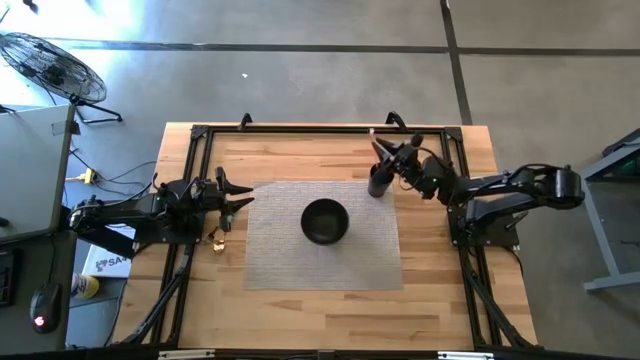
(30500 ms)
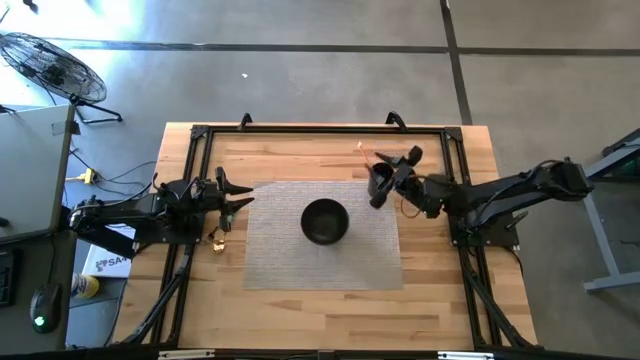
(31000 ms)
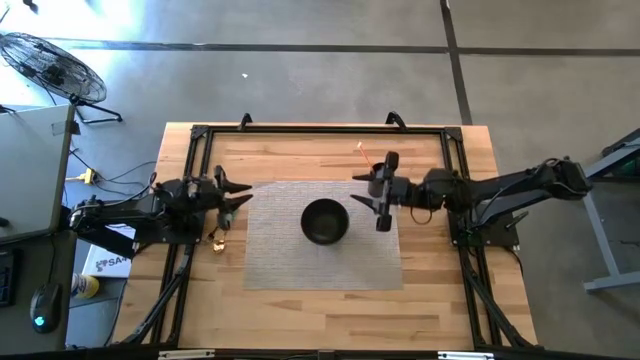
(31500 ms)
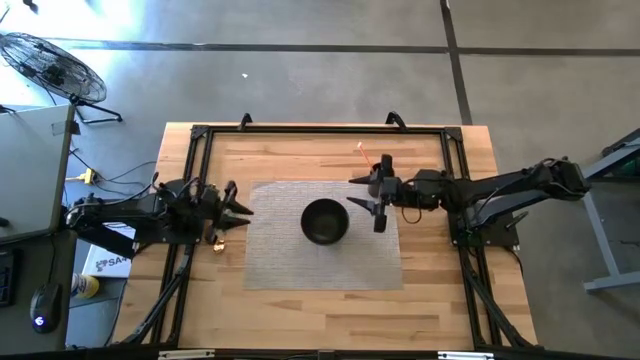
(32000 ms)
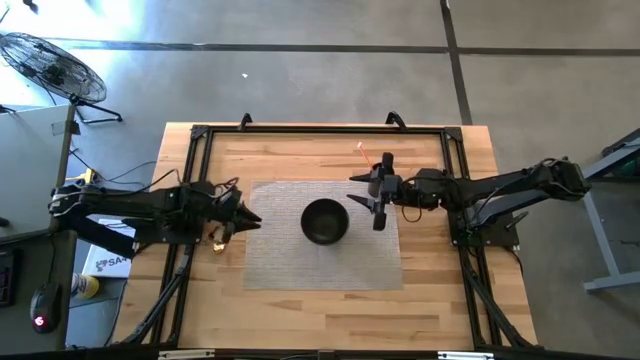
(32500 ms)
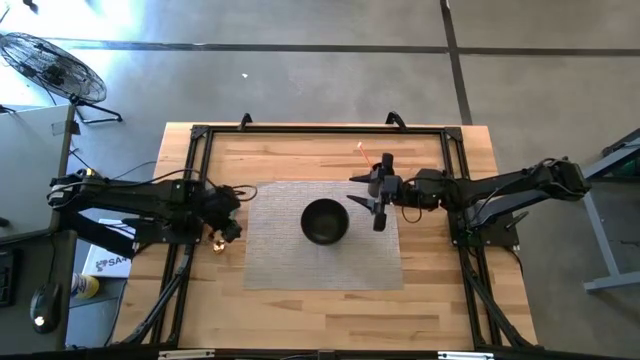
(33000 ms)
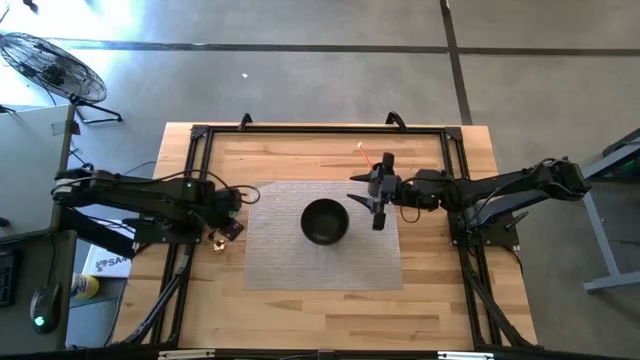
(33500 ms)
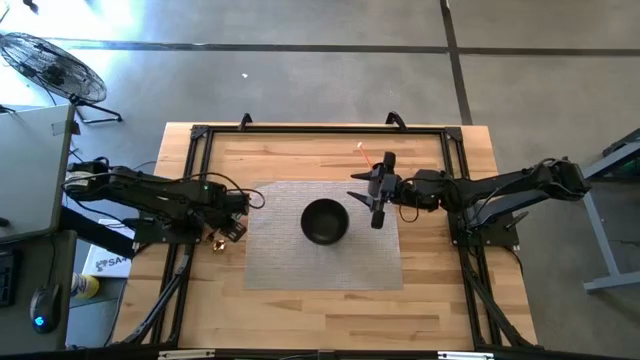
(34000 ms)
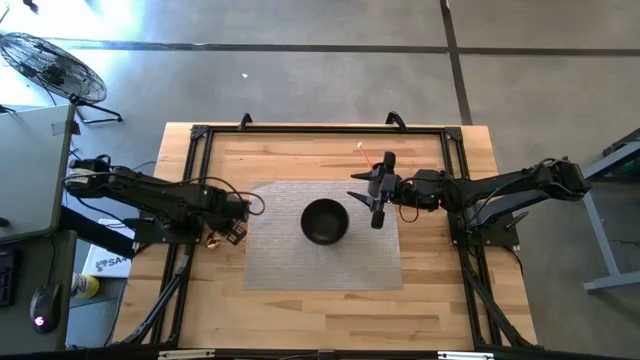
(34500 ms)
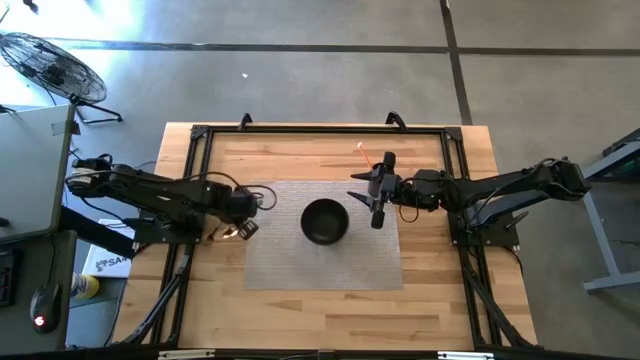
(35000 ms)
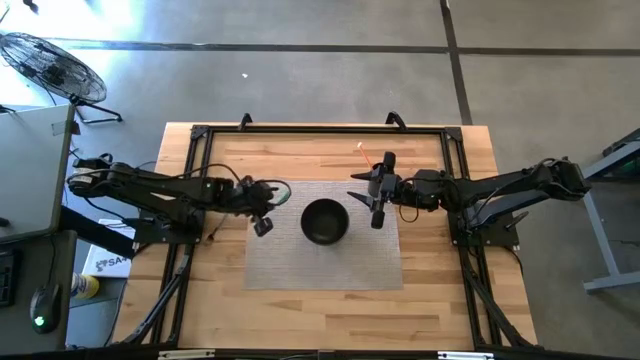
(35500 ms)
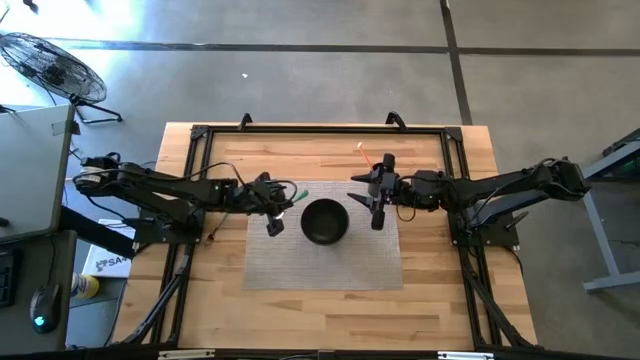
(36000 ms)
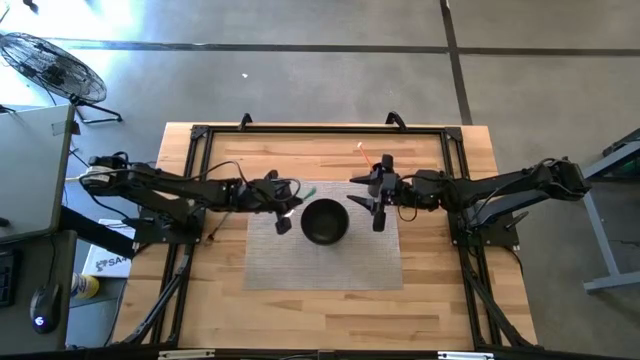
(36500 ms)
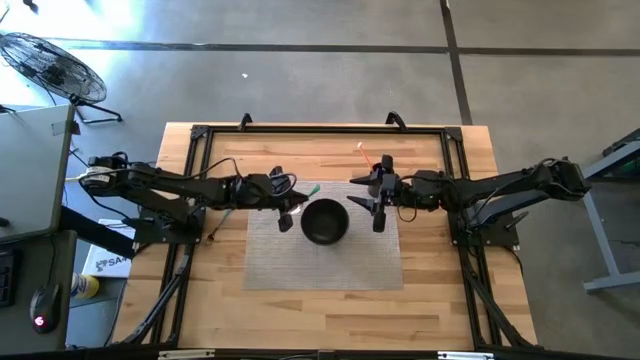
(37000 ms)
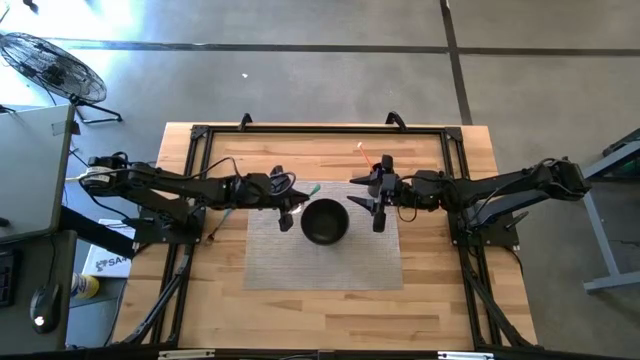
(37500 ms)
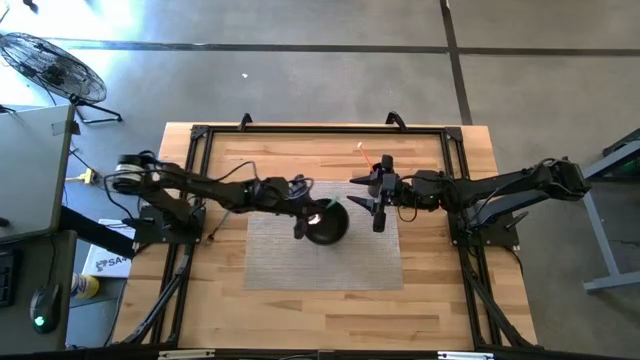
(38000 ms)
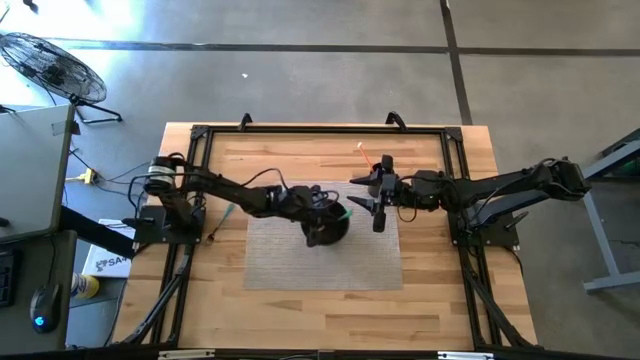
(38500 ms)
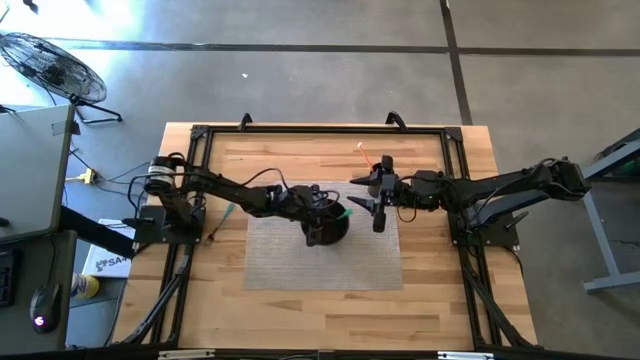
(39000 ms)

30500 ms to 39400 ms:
Task: Pick & Place Utensil
Put the green spoon into the black bowl

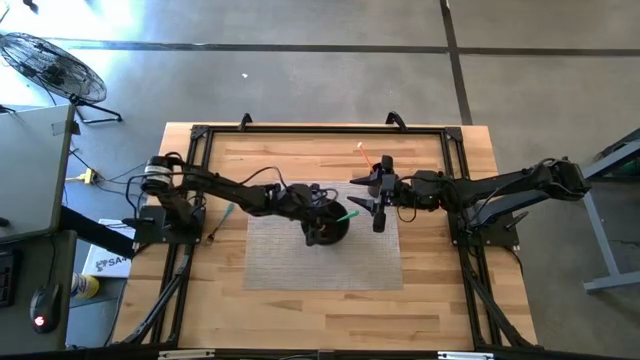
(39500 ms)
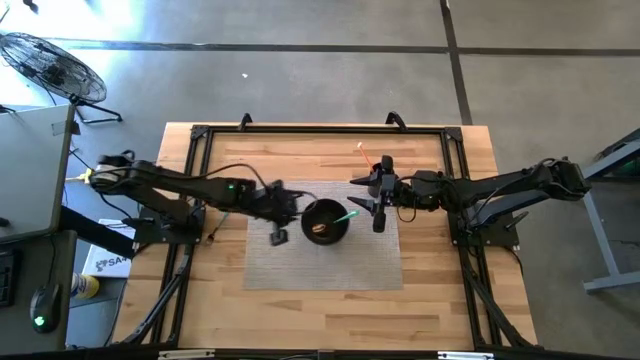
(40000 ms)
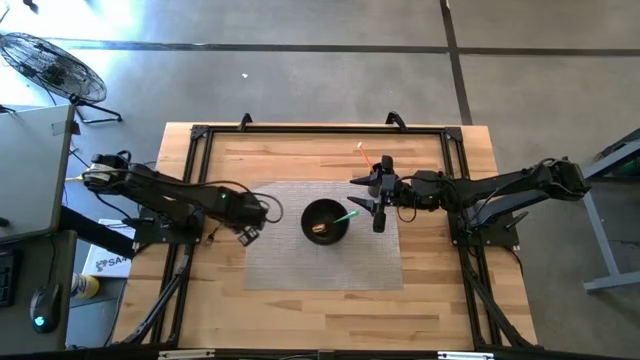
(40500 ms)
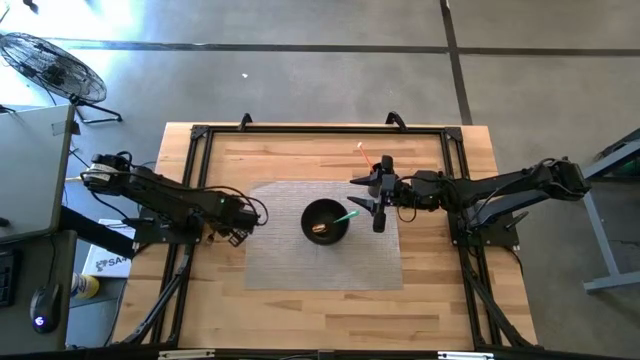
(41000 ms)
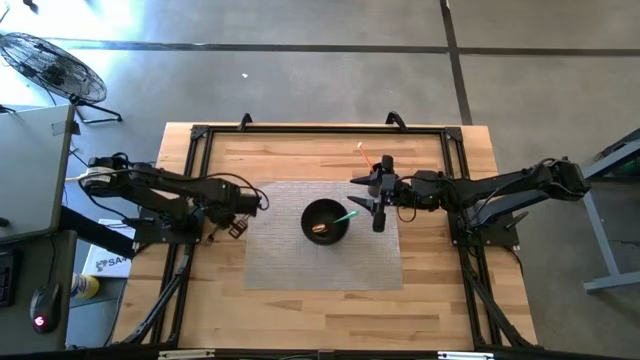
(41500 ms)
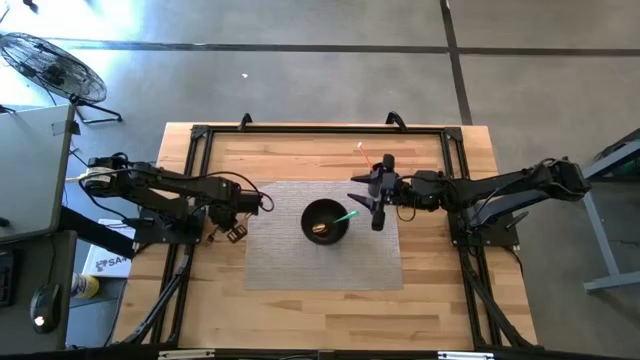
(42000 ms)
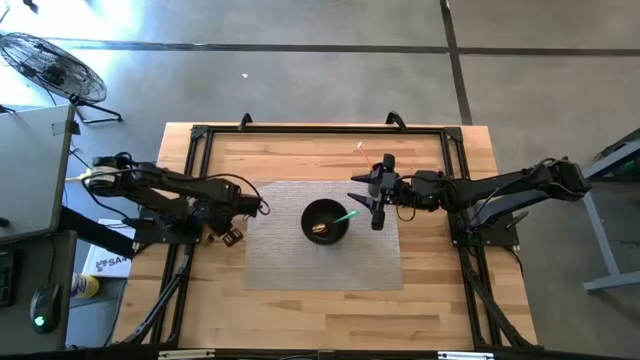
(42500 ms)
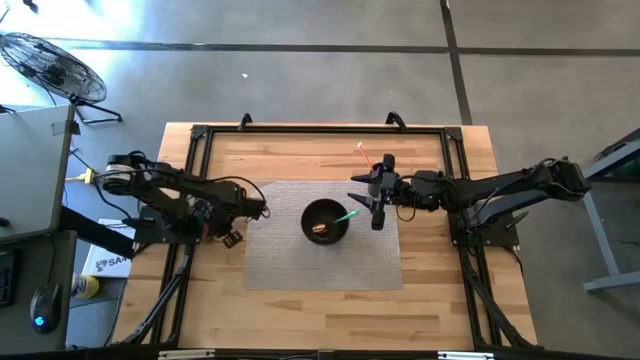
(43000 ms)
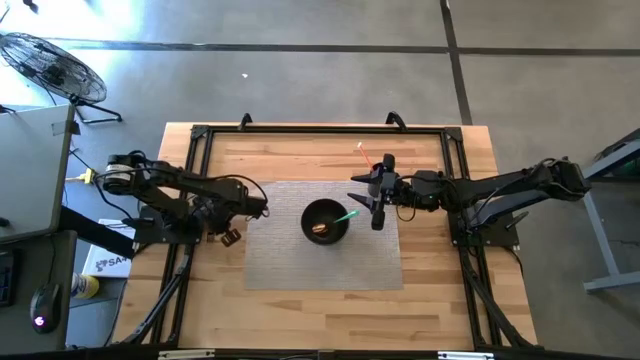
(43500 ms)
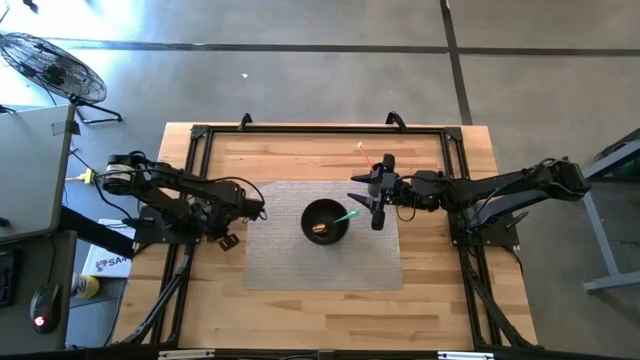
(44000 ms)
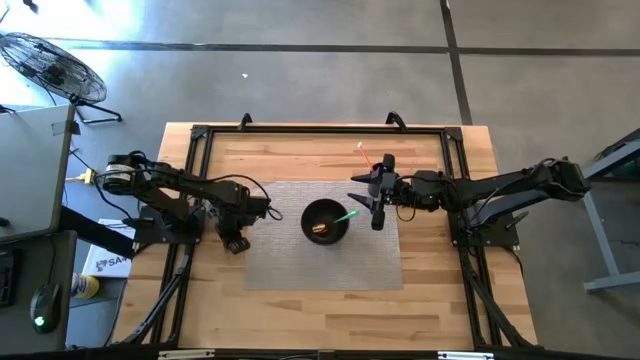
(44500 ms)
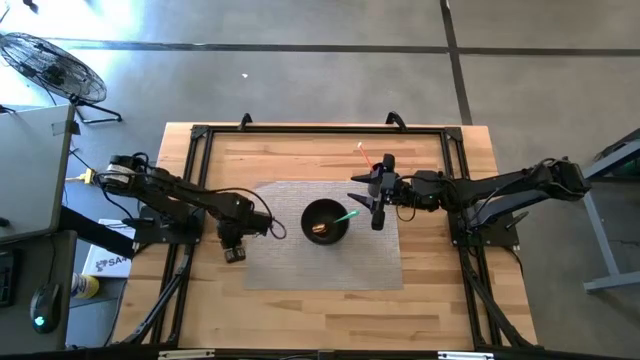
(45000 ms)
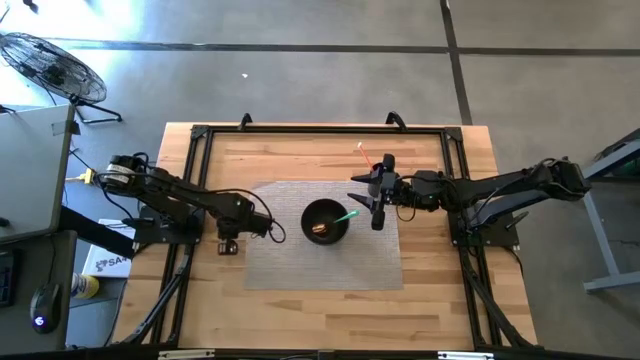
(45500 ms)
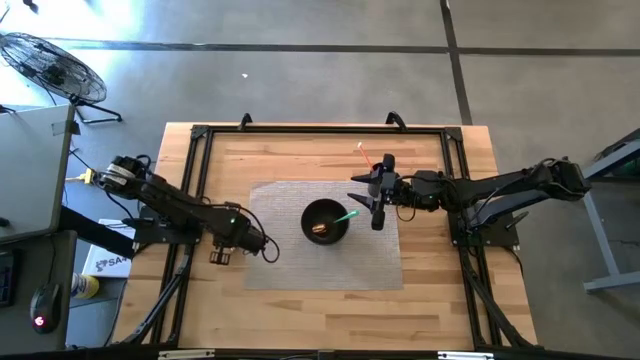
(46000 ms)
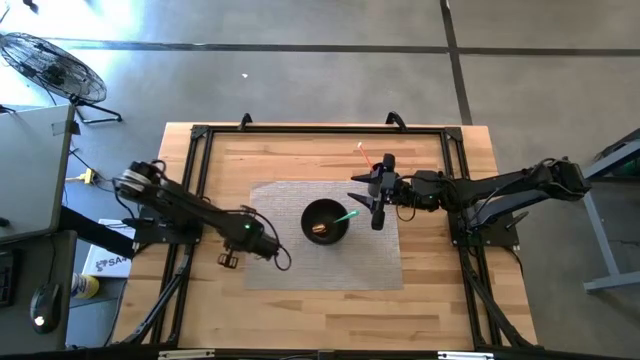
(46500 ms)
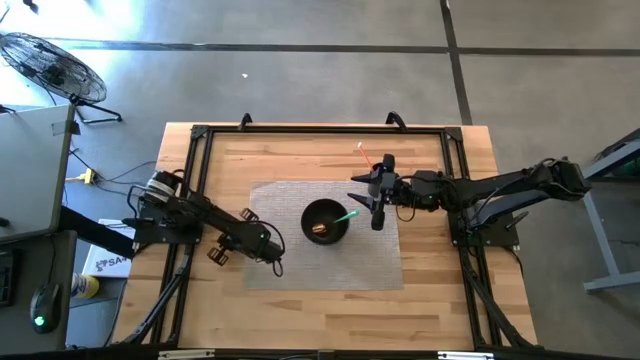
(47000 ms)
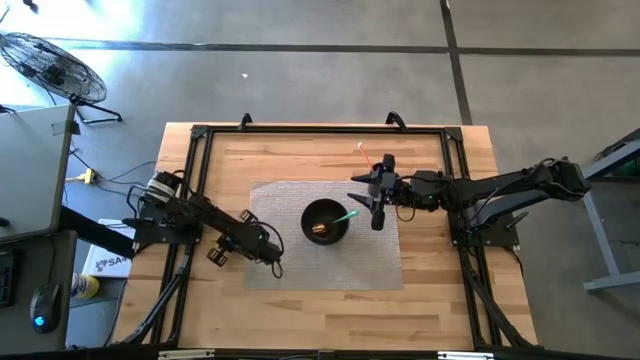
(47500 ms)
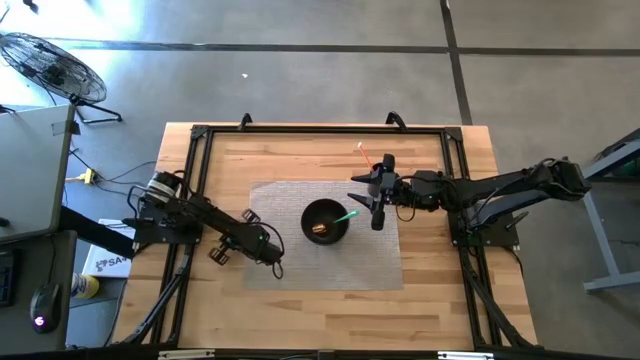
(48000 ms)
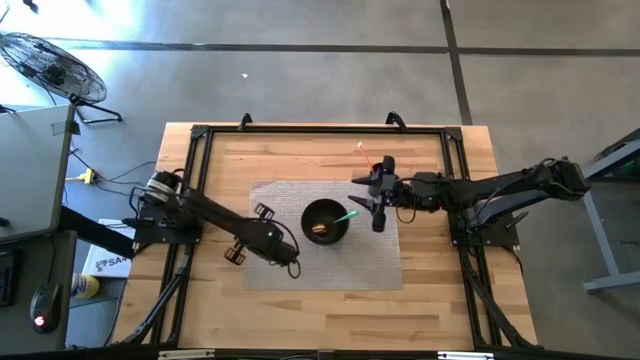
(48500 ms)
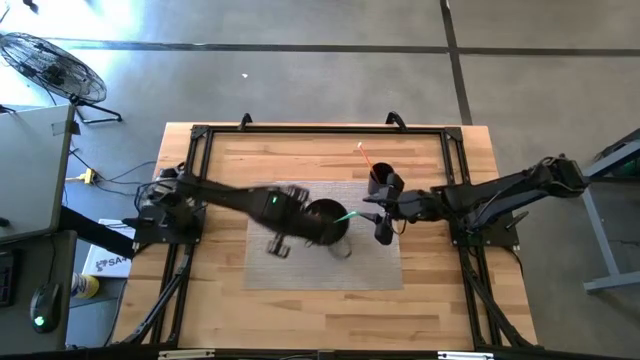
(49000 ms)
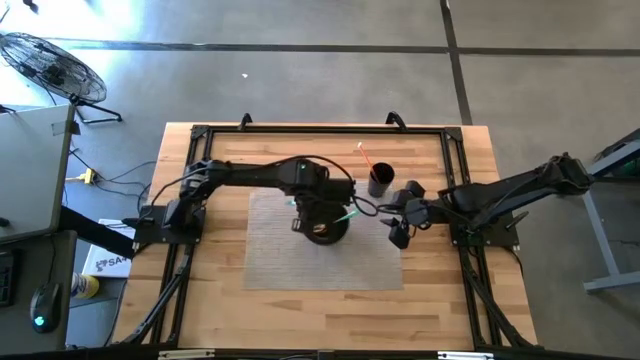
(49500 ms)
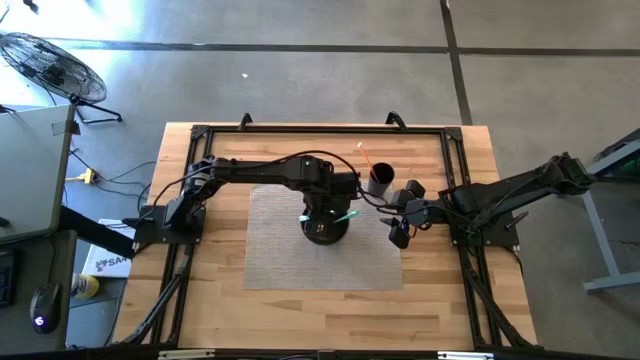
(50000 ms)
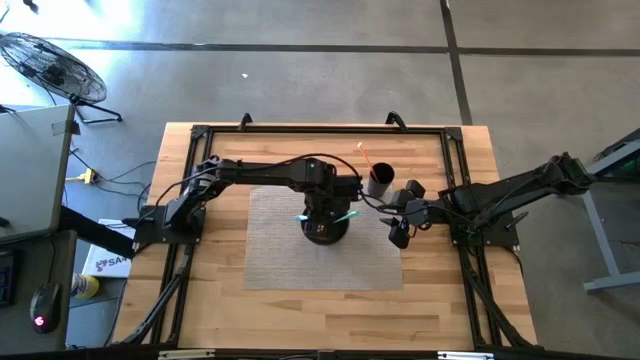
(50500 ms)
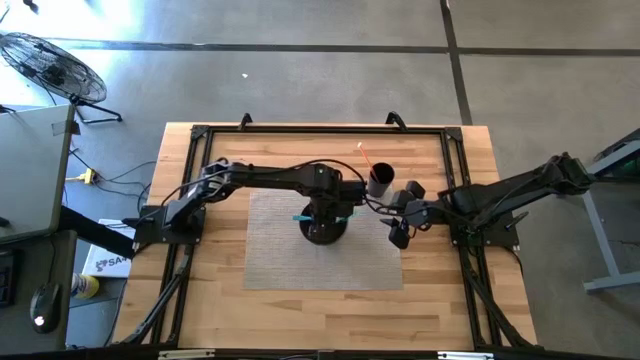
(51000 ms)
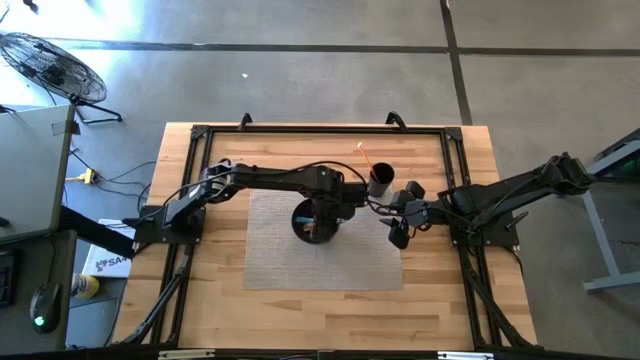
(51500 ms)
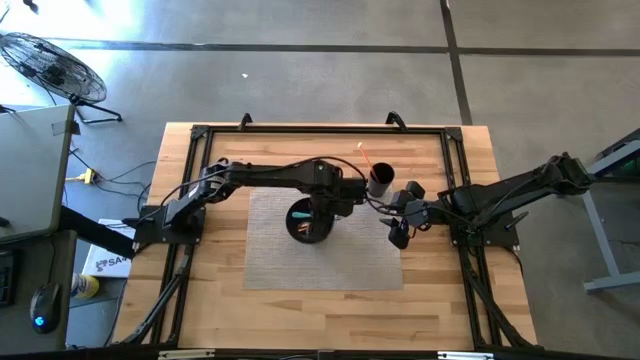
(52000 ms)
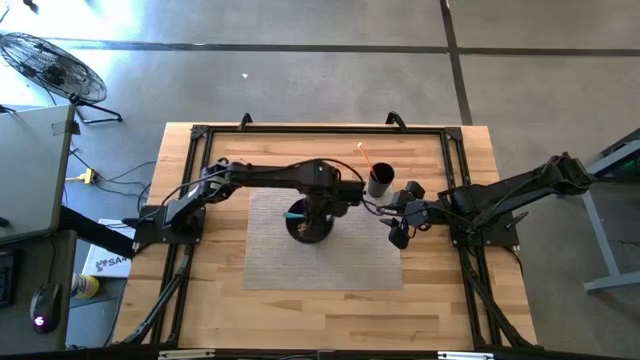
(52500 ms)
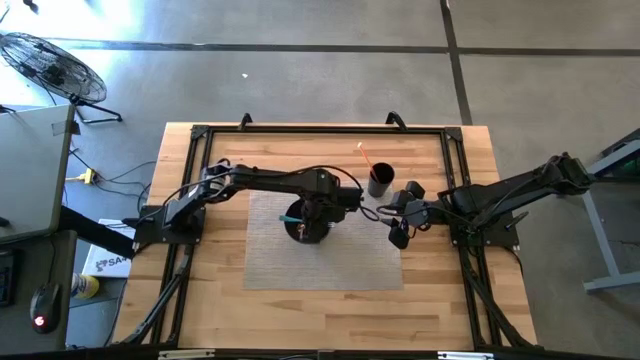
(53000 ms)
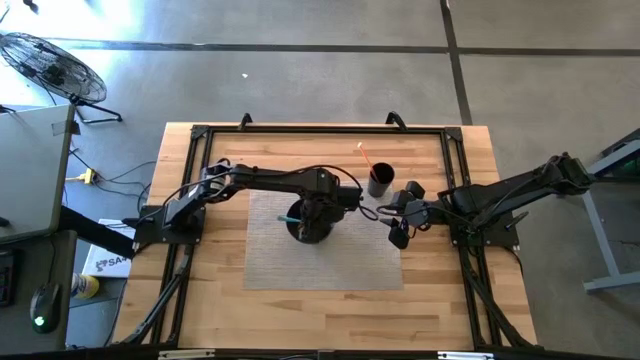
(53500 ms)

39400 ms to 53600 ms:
Put the blue fork into the black bowl
